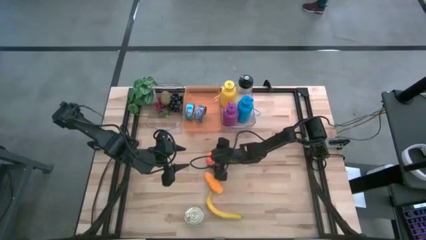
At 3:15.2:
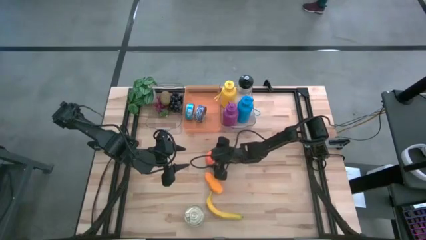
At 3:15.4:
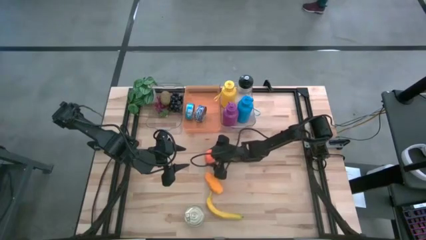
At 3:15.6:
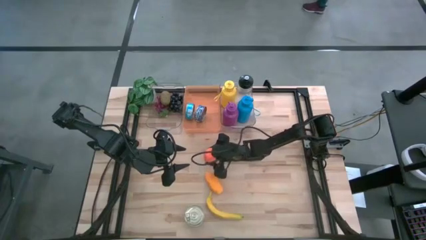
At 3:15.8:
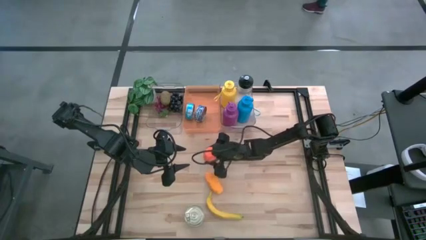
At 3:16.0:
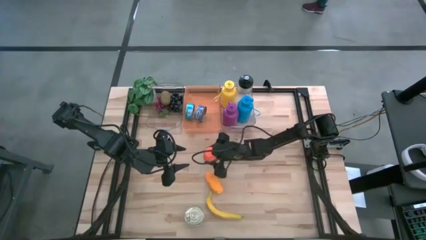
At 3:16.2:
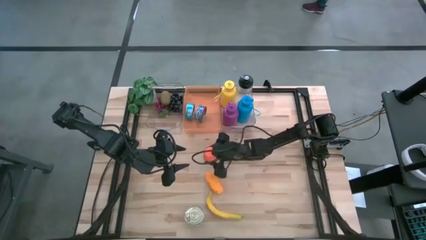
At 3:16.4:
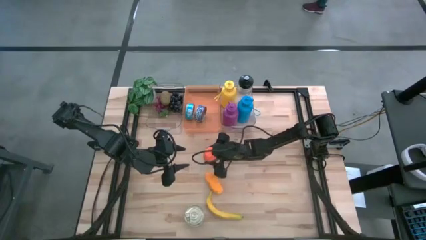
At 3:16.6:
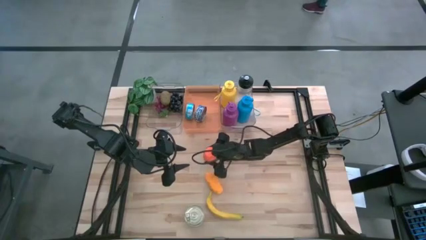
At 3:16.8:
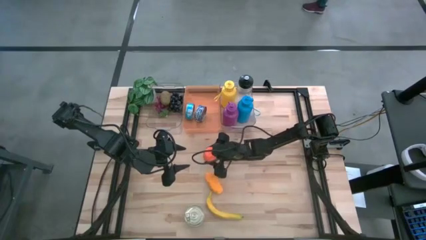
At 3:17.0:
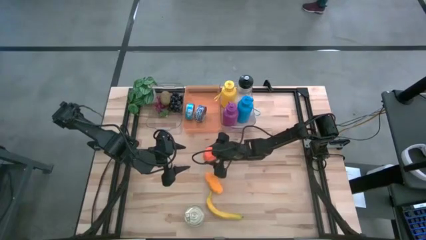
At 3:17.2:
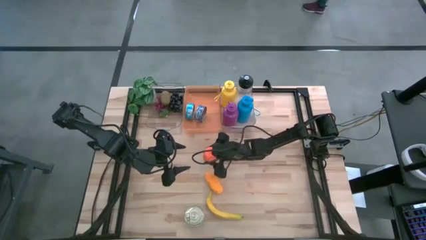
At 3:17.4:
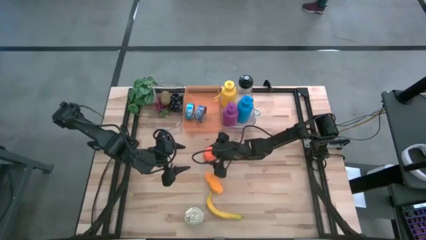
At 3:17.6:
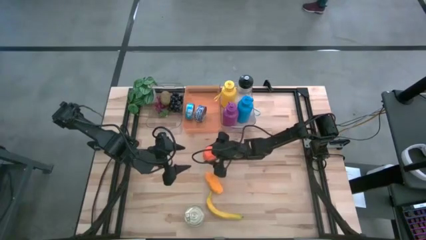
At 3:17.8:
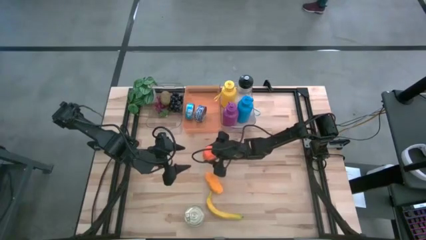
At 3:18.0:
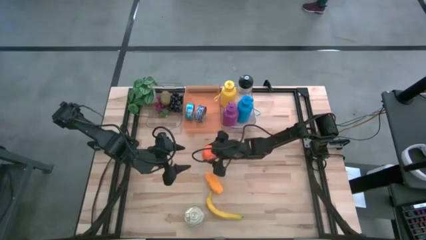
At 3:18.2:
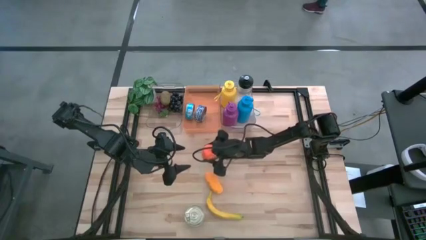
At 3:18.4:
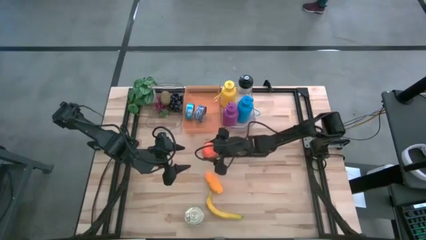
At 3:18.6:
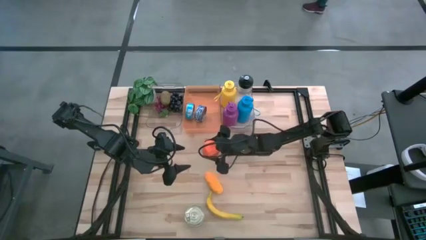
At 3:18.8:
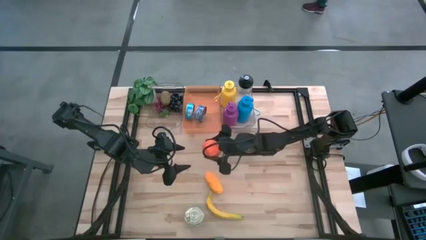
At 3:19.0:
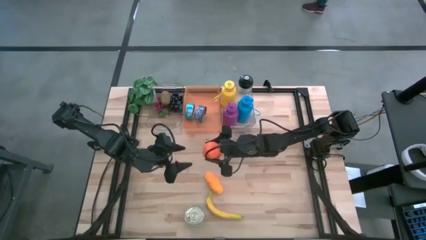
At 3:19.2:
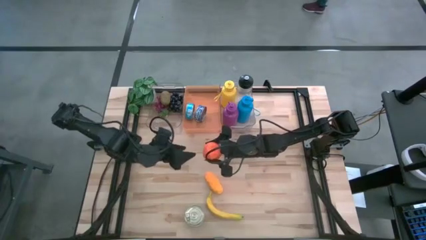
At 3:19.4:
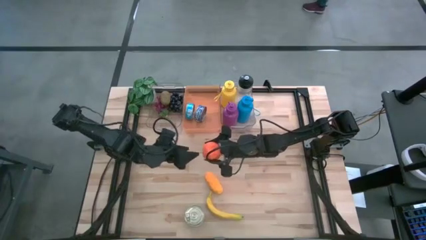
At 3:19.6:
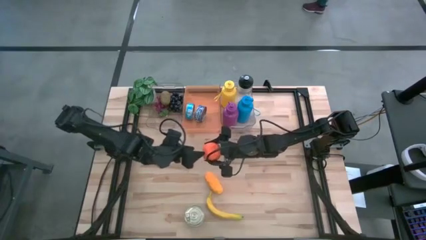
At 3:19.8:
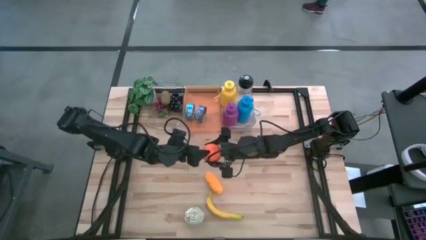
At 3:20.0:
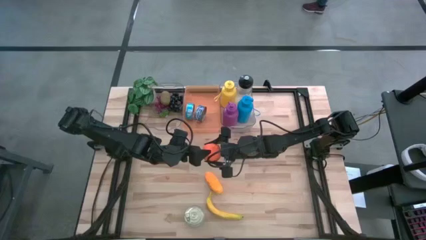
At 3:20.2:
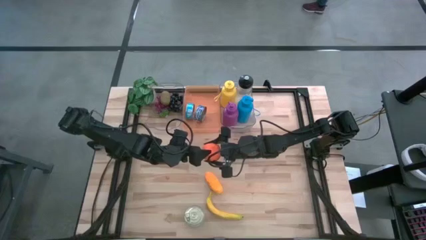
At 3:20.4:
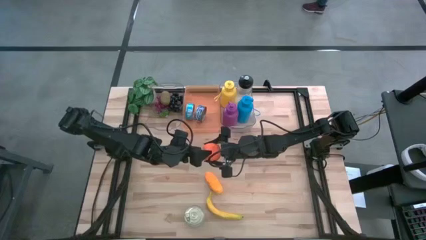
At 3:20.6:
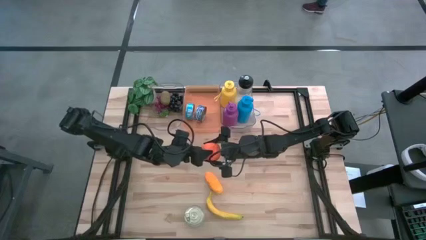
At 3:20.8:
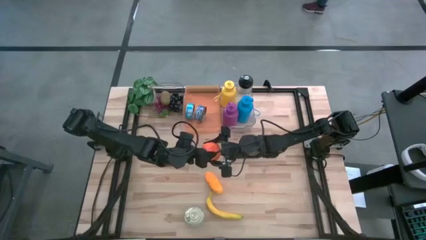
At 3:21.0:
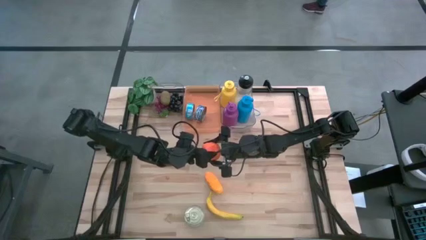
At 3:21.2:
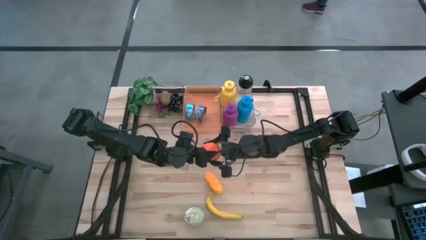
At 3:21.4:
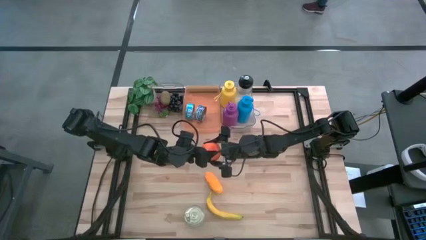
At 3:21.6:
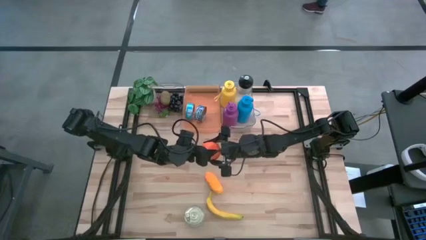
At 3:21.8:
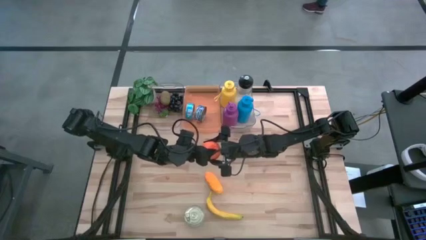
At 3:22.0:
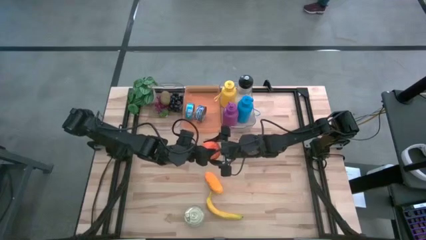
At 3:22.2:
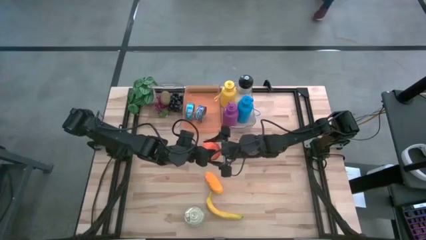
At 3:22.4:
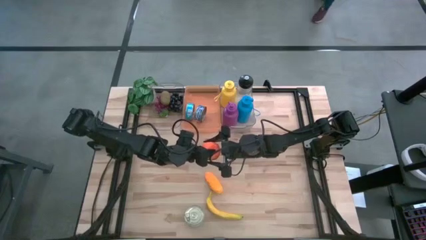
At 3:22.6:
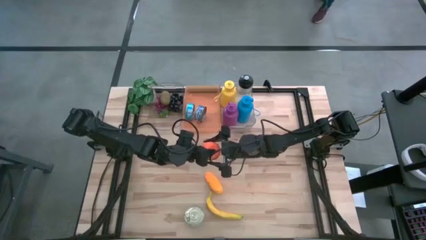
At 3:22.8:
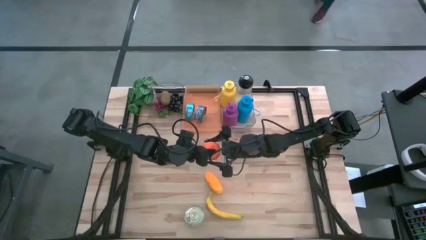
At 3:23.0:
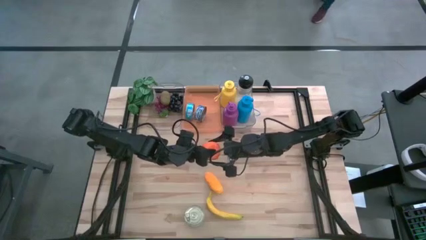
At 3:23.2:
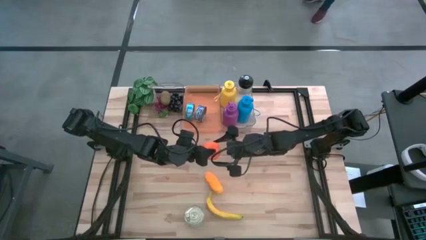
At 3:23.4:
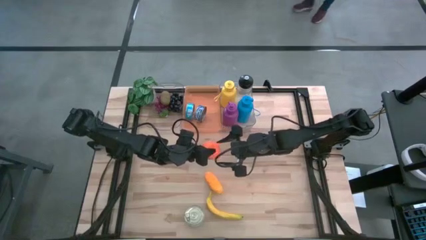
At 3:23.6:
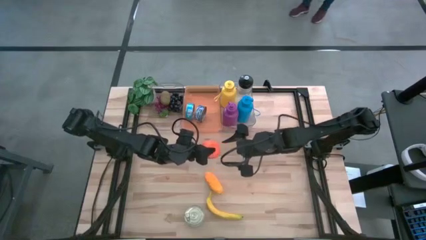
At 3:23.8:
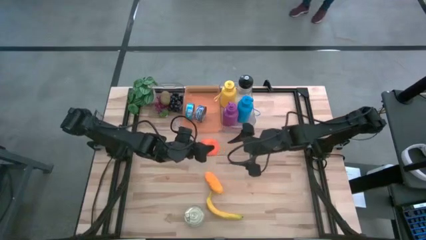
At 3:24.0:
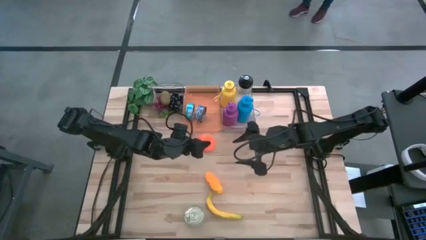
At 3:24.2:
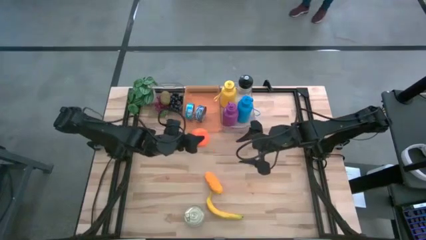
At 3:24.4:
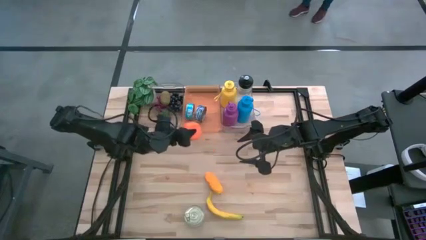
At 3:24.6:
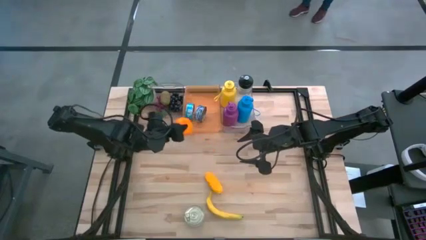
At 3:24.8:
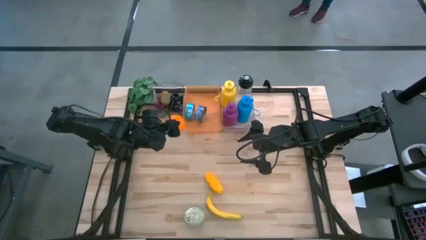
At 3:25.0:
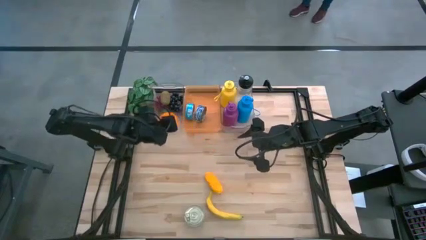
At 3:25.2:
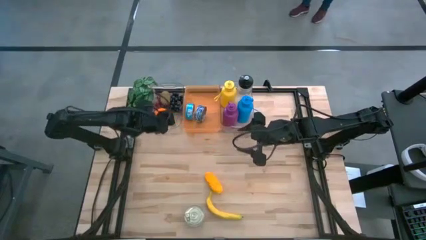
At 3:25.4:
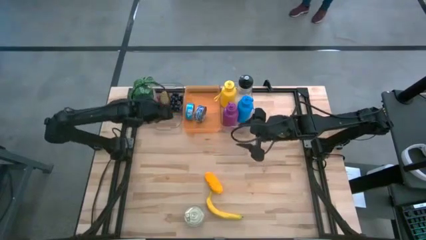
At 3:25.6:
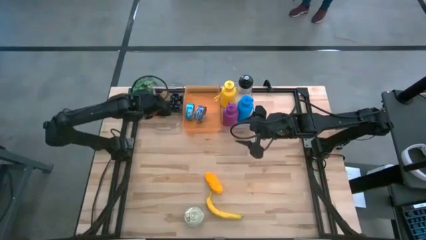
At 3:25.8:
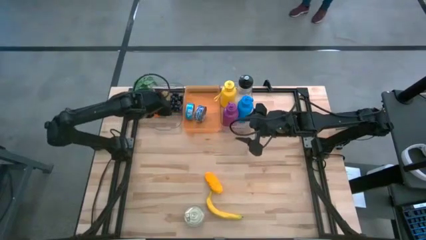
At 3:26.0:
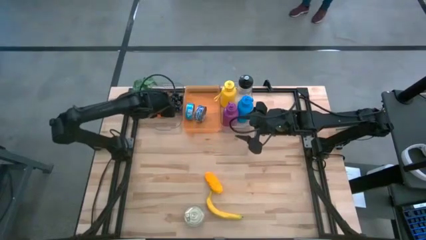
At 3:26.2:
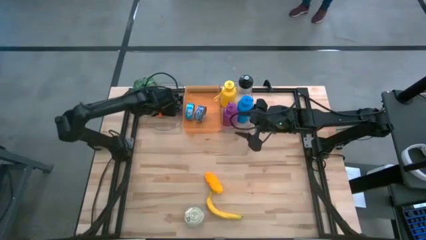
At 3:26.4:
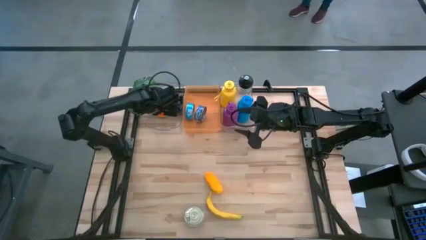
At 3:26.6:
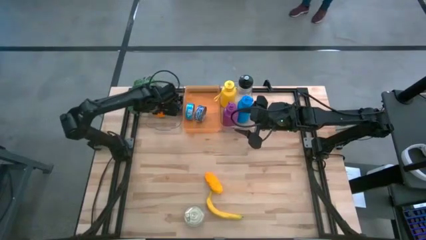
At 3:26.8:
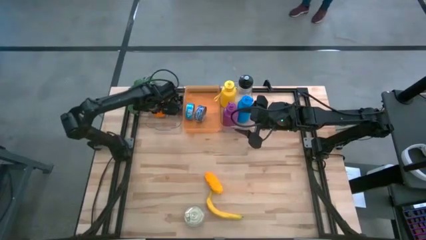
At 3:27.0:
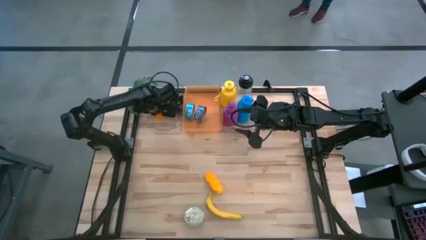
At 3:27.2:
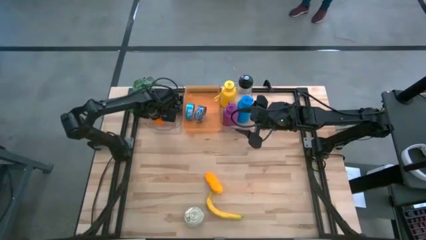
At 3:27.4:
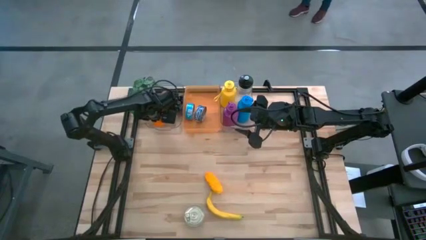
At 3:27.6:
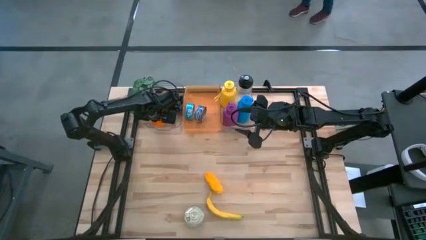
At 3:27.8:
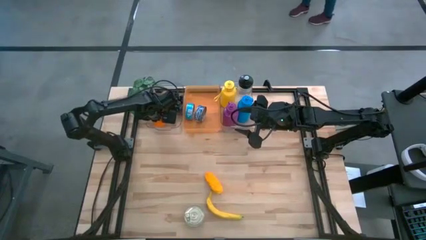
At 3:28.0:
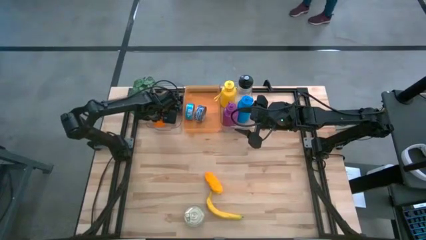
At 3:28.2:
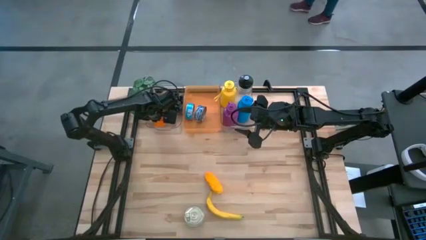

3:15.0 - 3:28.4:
Task: Pick & Place Food Item
Put the orange into the left transparent bin

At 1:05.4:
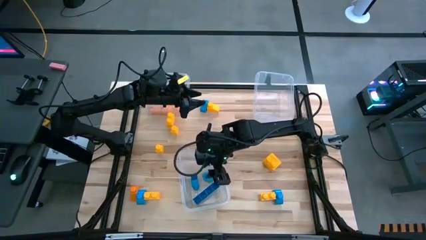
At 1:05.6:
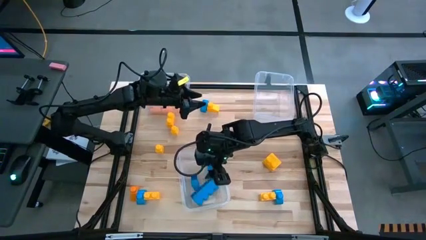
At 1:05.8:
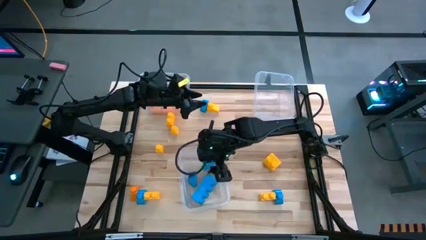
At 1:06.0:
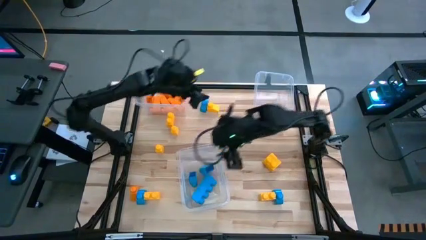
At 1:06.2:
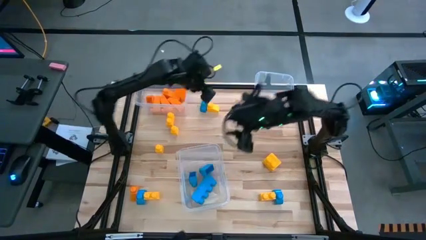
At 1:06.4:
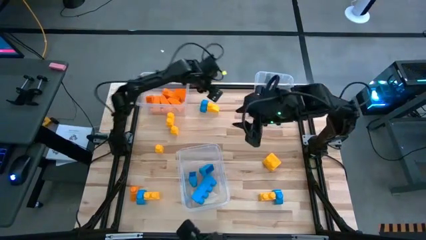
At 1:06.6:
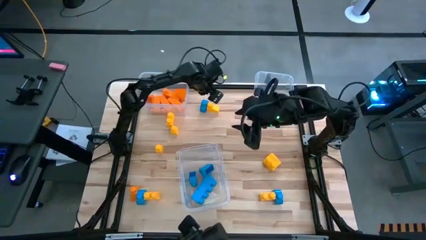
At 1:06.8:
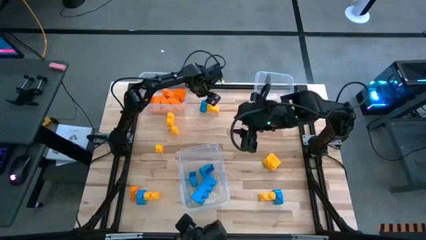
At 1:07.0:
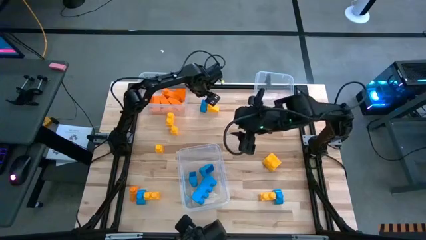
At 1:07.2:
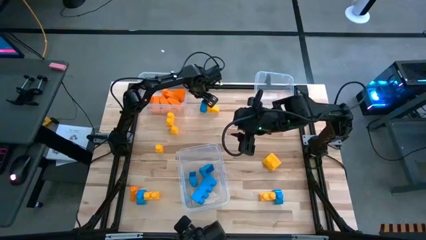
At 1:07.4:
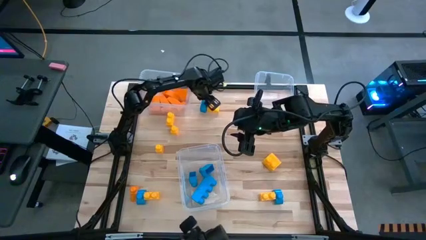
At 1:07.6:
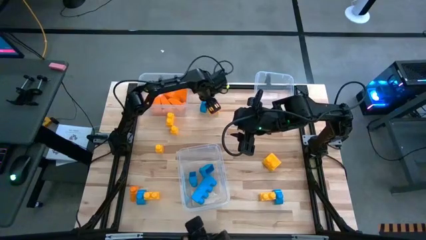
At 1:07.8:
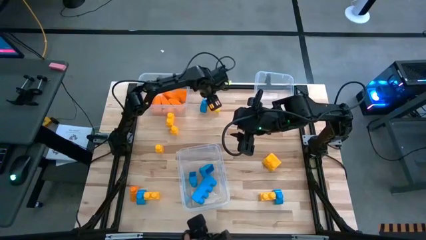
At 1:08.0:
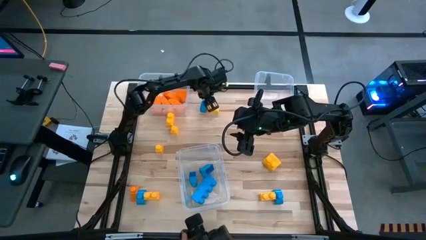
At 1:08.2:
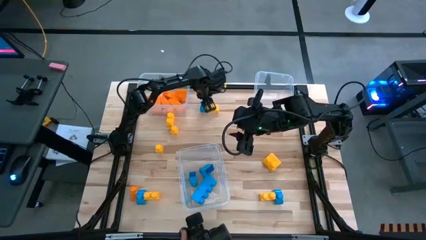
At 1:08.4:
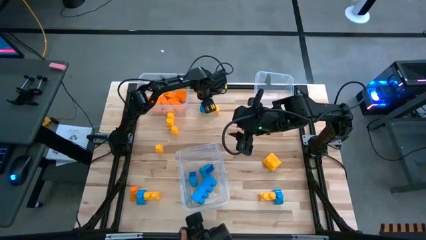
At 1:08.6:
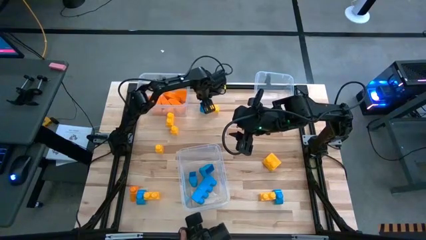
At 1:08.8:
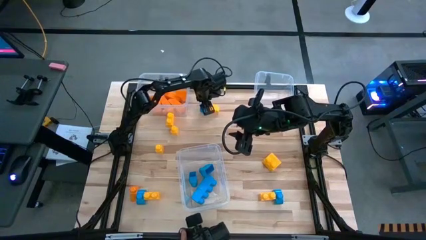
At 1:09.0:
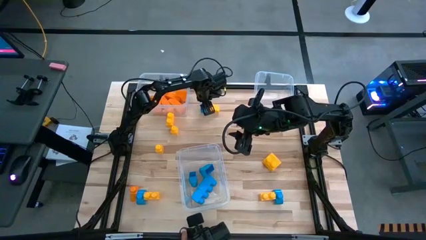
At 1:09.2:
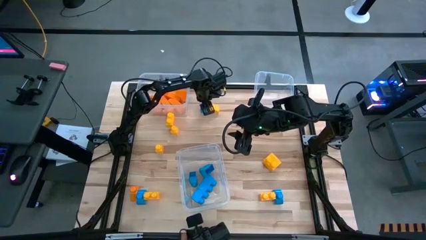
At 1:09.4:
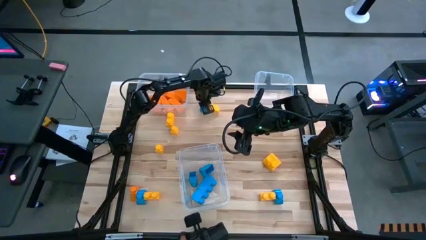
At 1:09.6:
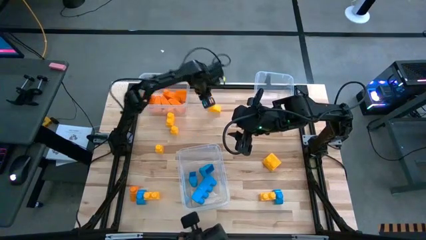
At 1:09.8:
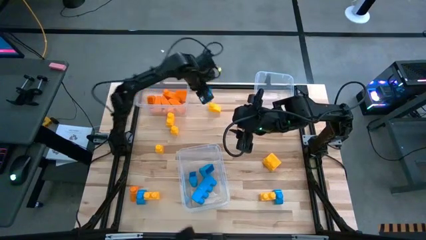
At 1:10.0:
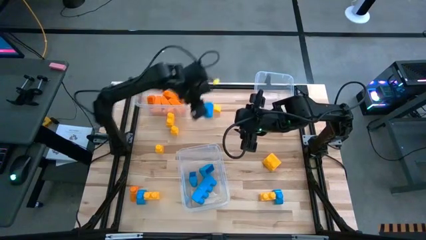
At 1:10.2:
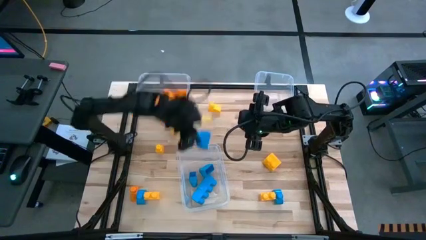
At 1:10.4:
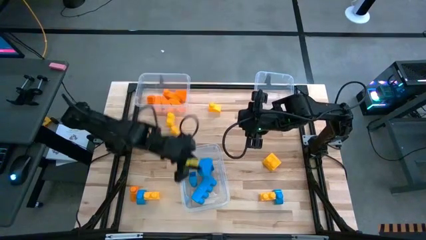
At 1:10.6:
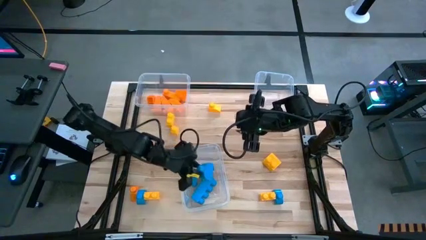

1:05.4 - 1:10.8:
Task: Sort blocks
Put the blue game piece into the bottom transparent bin
